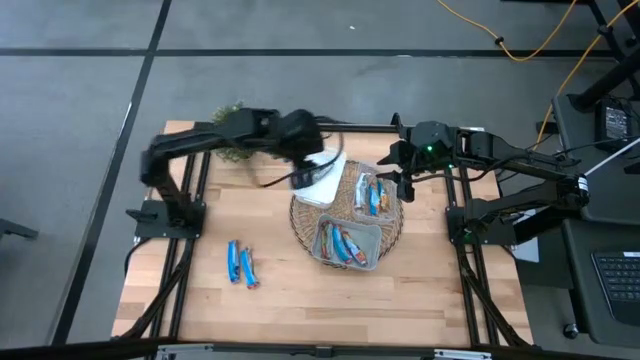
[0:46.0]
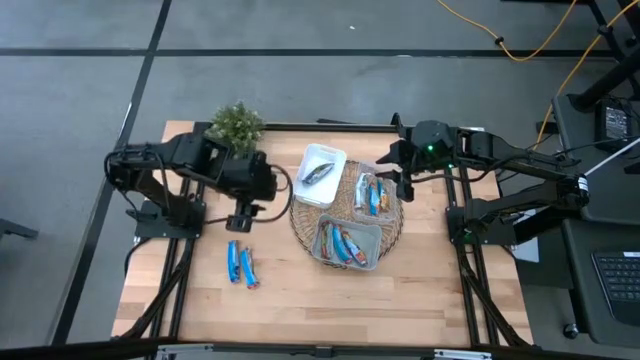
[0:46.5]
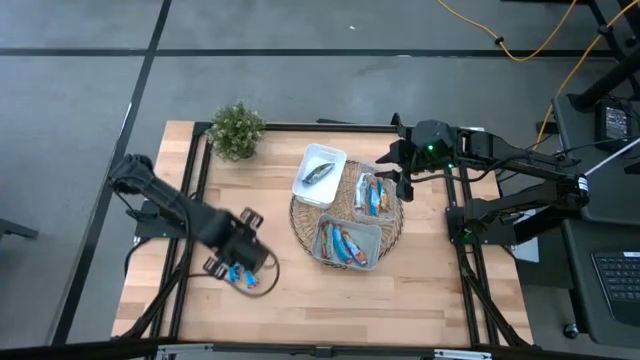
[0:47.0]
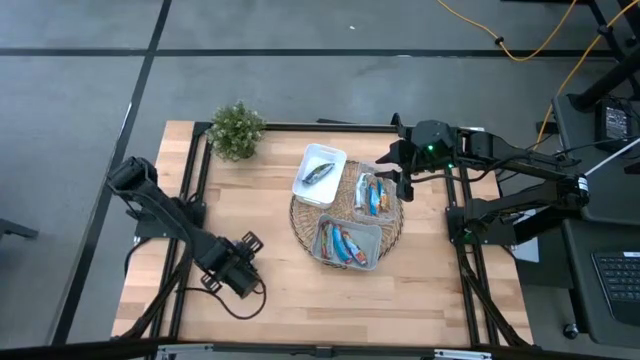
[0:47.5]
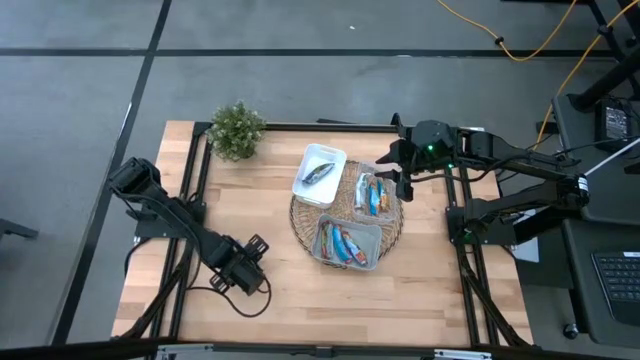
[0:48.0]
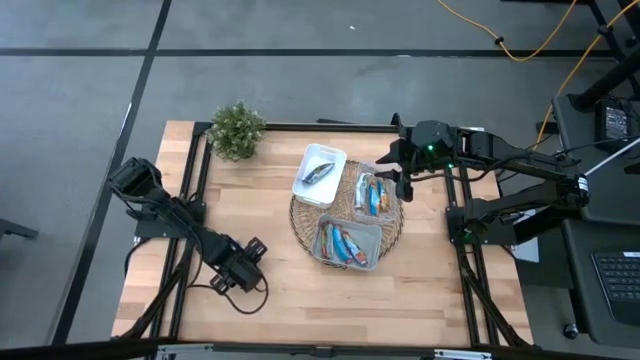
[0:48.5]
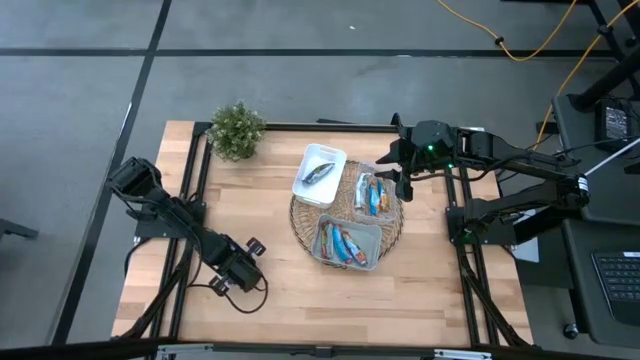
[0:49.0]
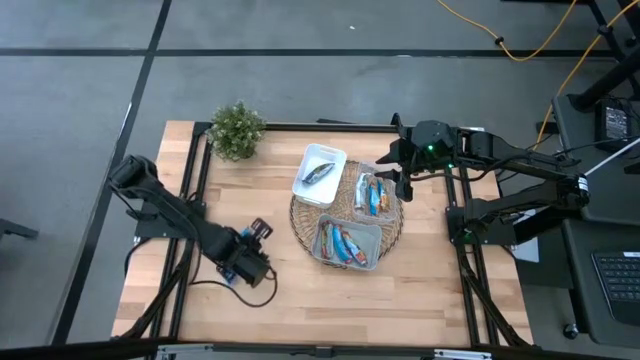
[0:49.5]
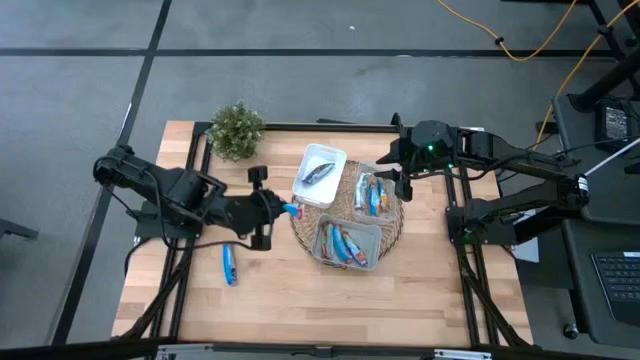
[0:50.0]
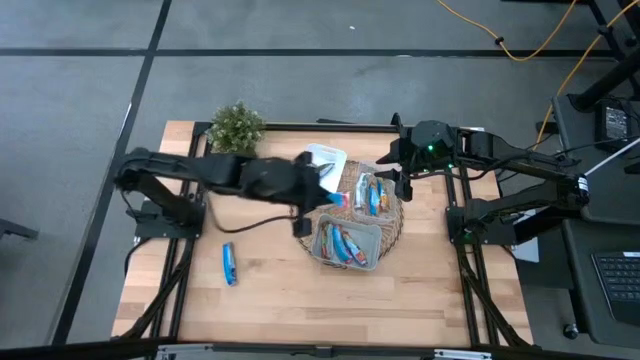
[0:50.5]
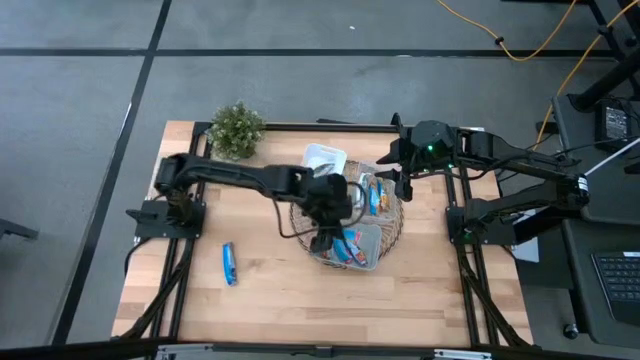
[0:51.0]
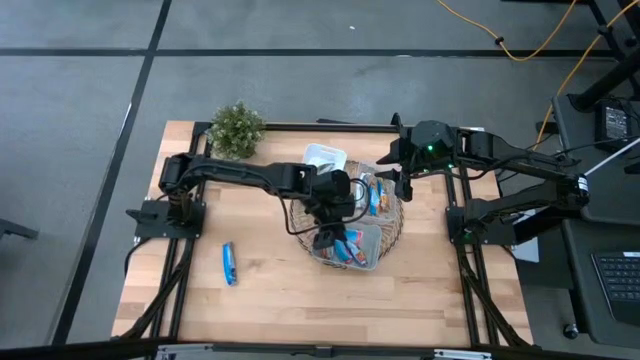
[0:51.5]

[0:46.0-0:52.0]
Task: Pick and place Granola Bars by type
Put the red granola bar into the gray bin

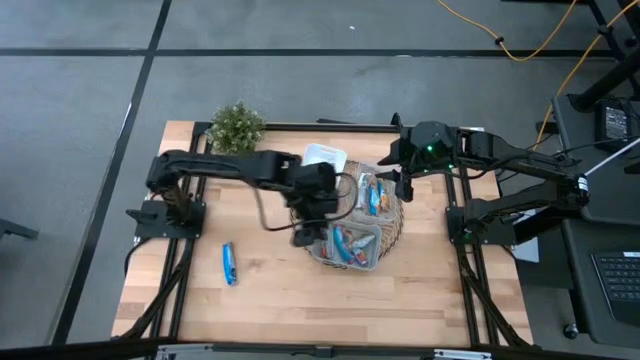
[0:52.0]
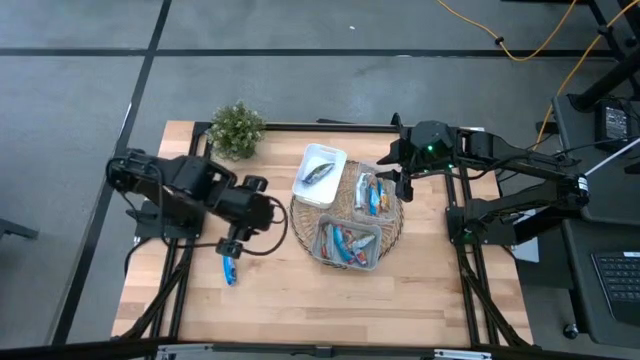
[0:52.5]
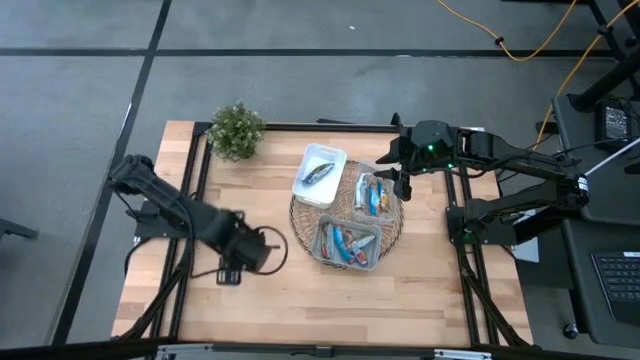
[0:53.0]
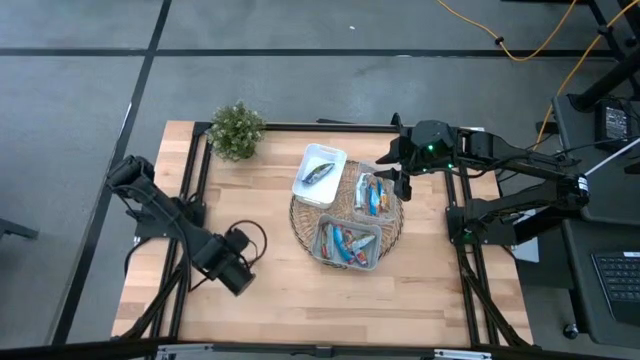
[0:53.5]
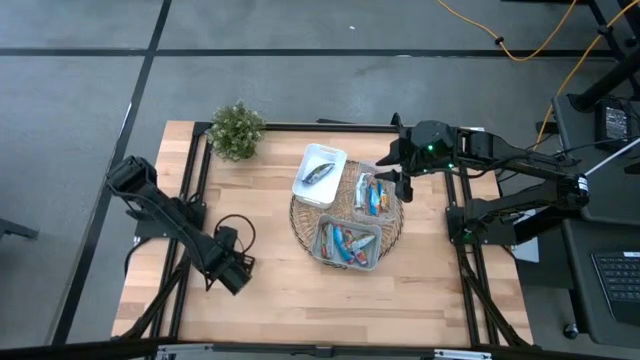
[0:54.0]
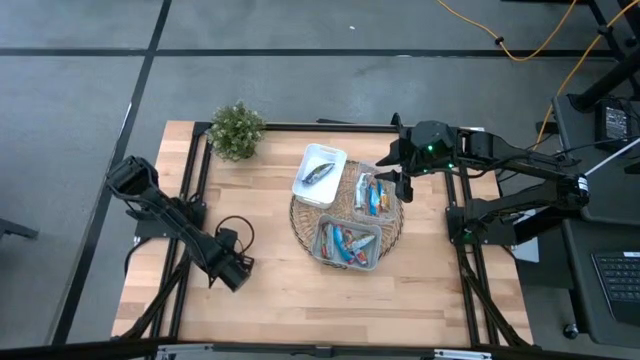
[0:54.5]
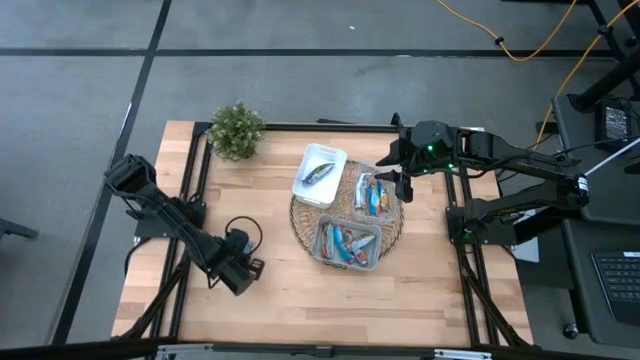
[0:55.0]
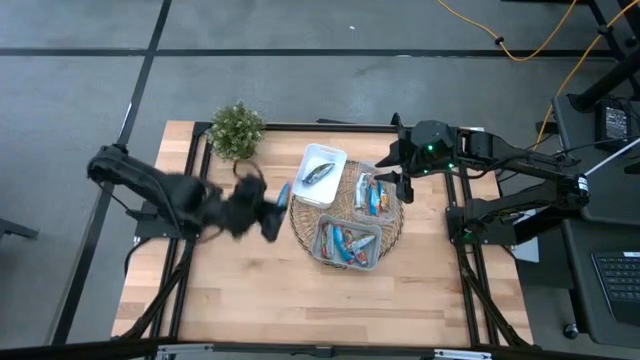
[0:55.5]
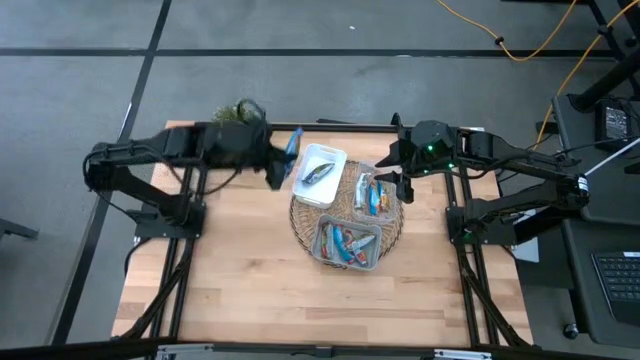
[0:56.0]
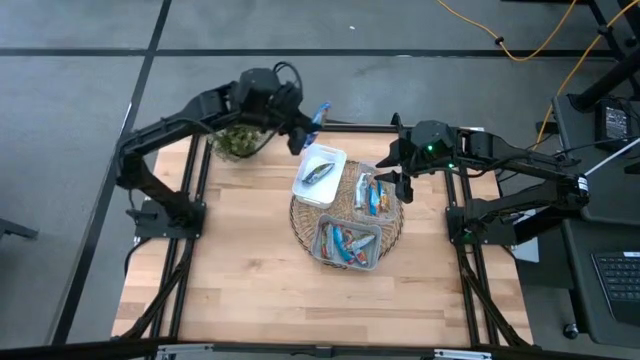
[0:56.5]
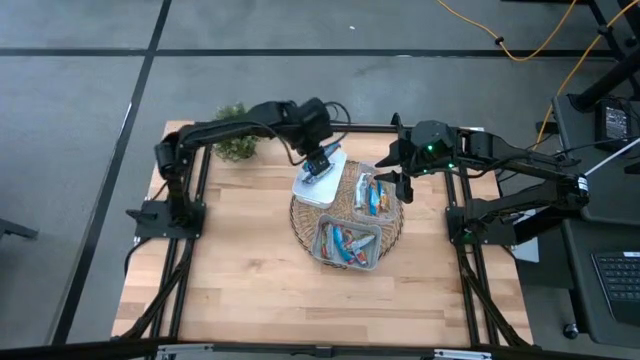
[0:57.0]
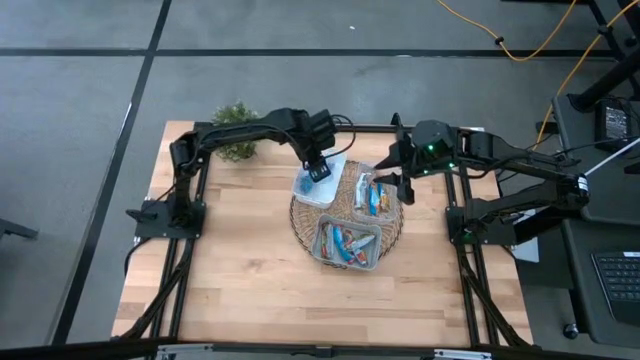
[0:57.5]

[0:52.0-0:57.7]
Put the blue granola bar into the white bin

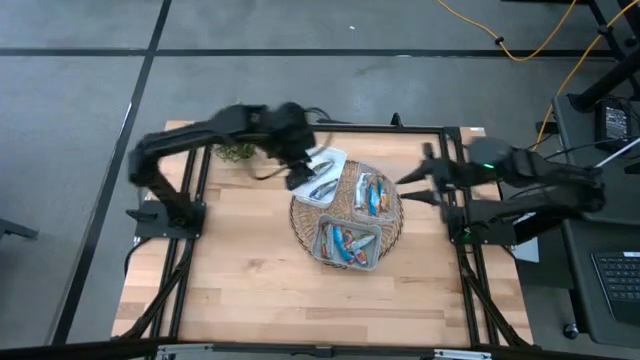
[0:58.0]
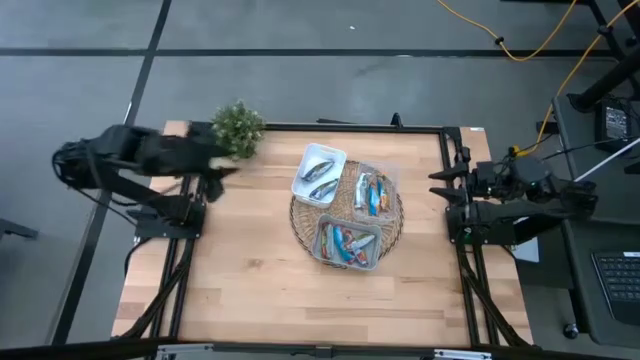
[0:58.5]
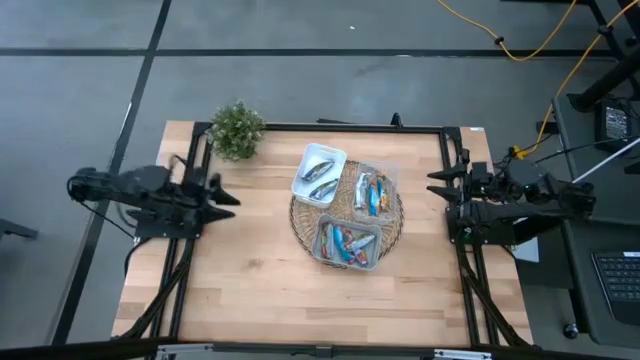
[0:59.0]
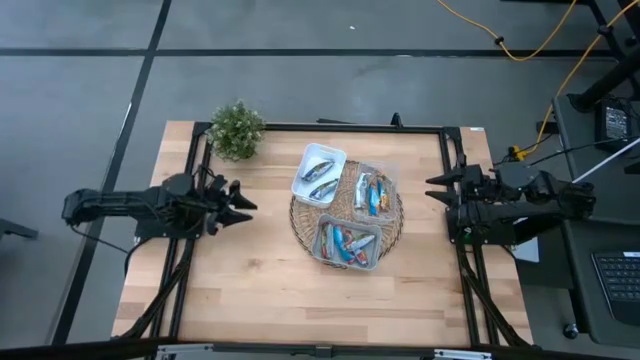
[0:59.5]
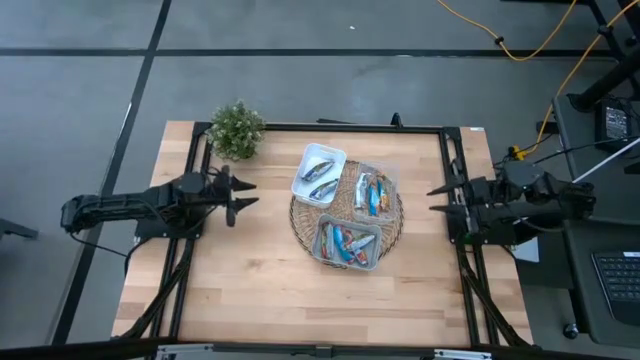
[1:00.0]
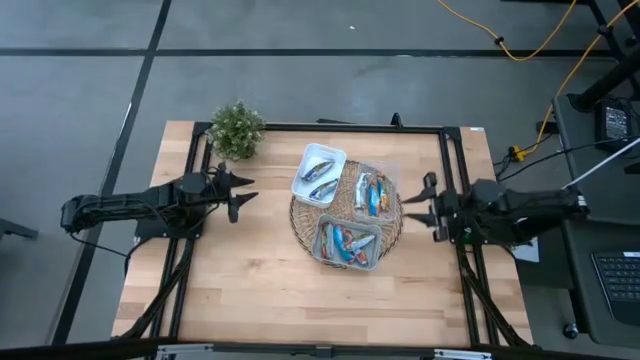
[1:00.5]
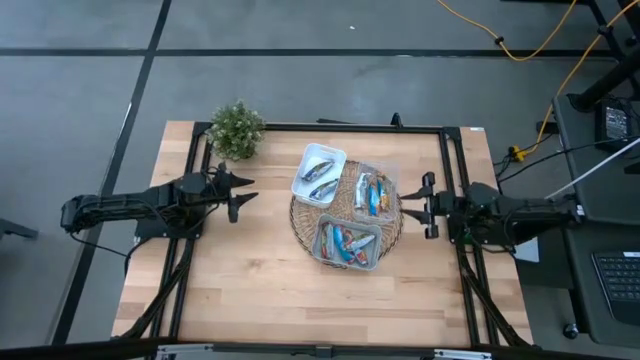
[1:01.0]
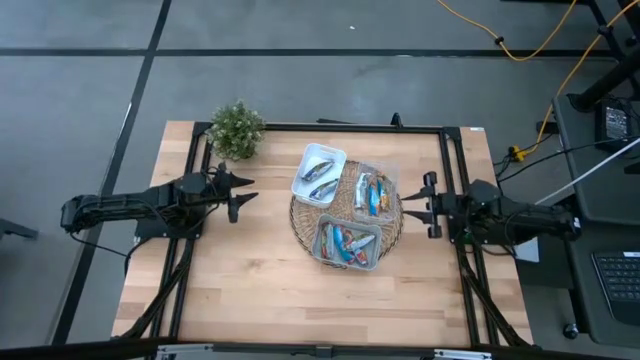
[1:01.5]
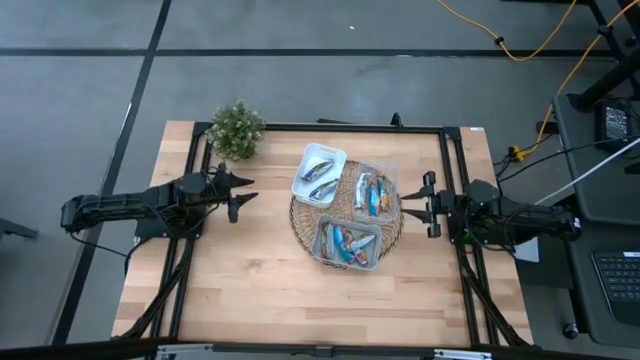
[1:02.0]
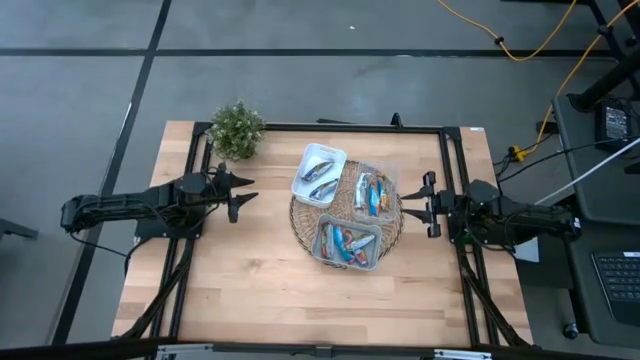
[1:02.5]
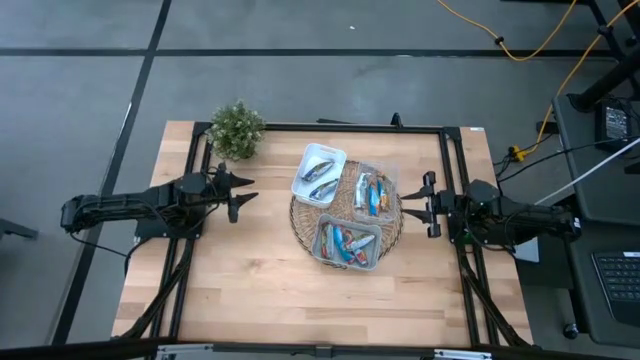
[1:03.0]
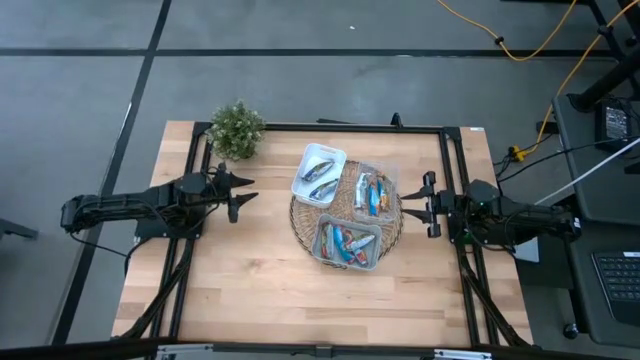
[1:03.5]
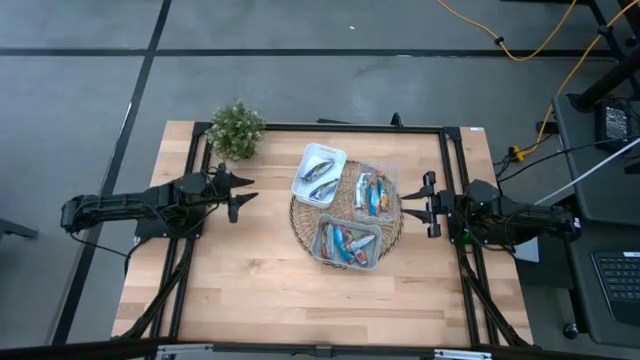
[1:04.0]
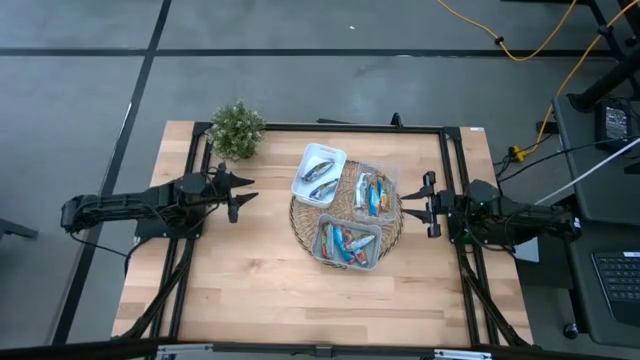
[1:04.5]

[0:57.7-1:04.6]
Return to Home Position

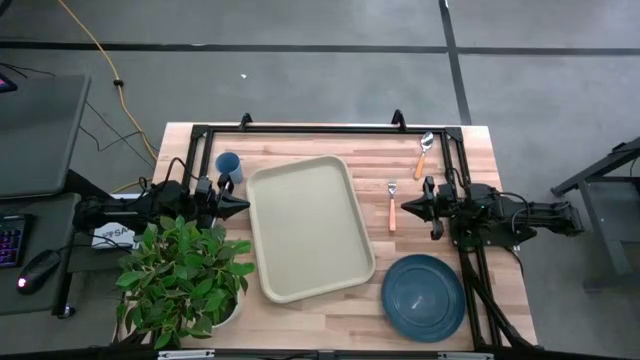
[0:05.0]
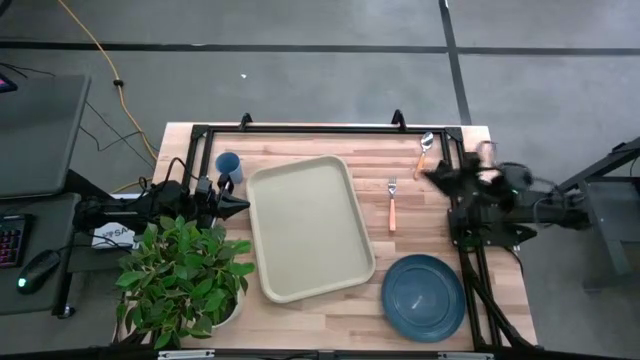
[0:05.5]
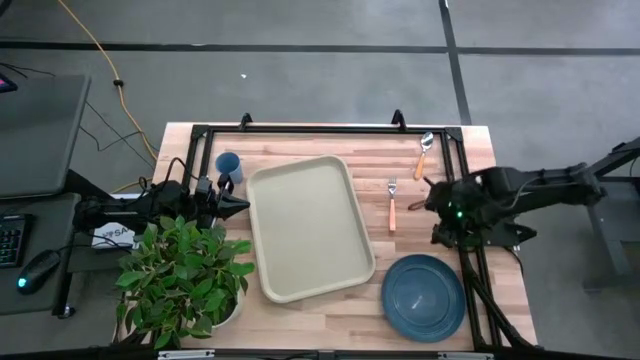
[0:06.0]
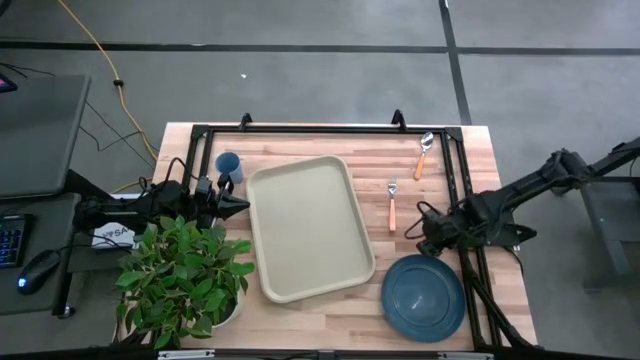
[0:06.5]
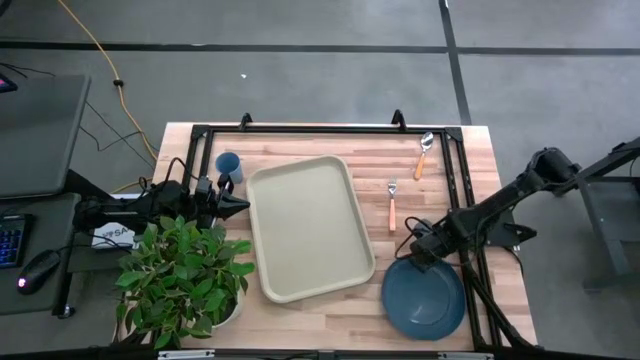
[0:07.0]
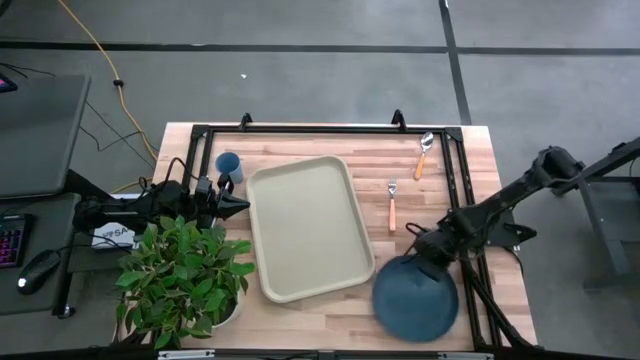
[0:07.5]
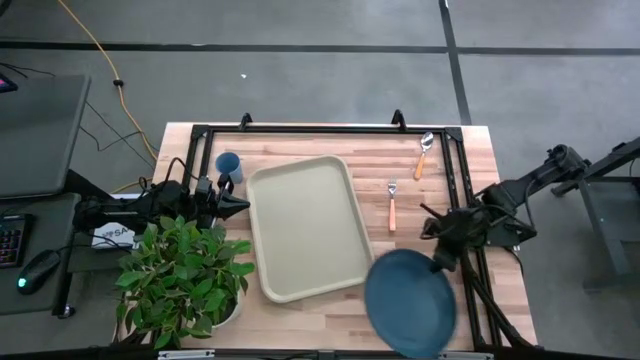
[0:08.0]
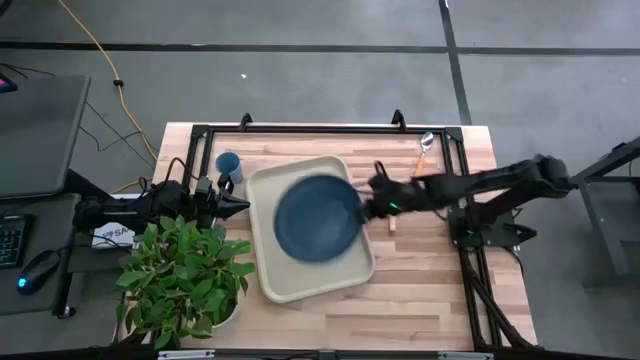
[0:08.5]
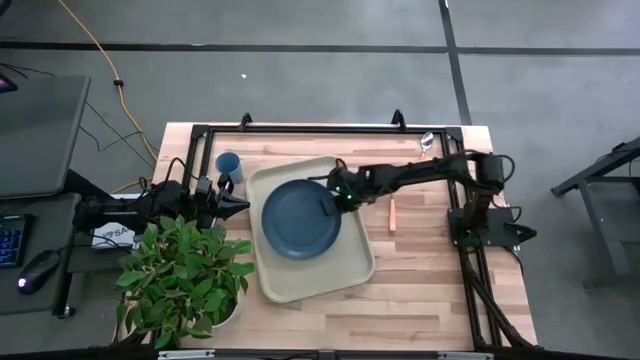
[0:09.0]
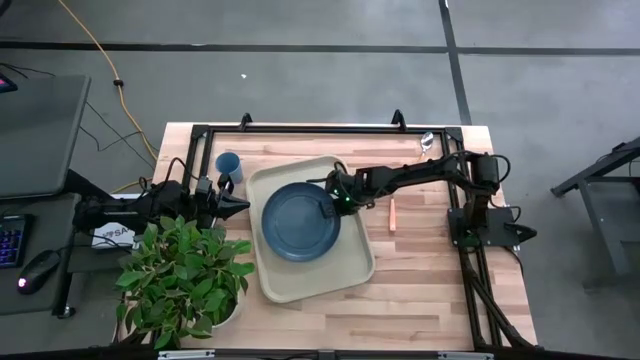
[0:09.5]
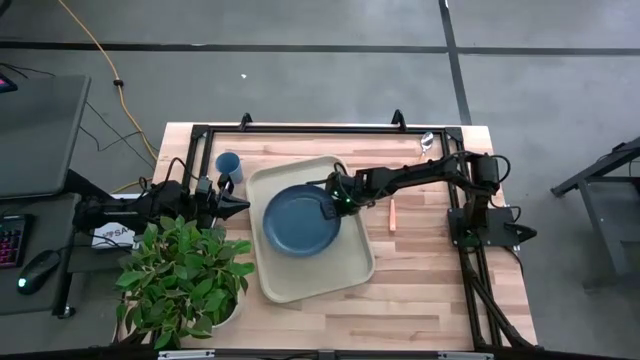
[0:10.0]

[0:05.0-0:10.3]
Task: Pick and place plate/cup/fork/spoon on tray
Put the blue plate in the middle of the white serving tray
